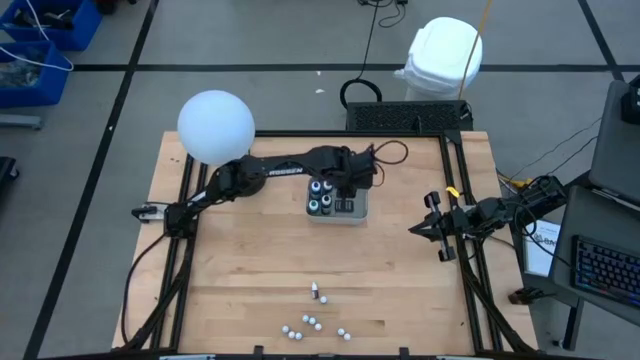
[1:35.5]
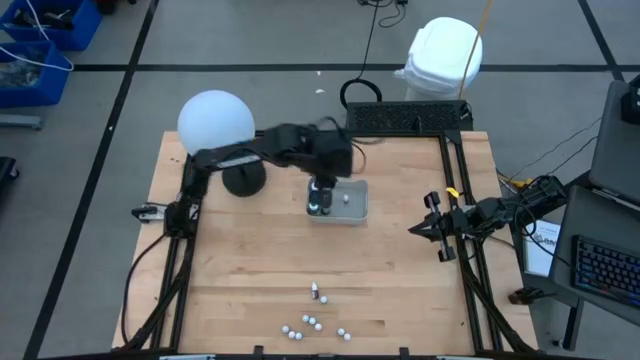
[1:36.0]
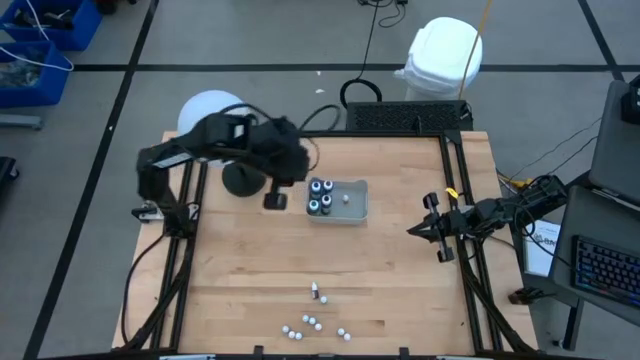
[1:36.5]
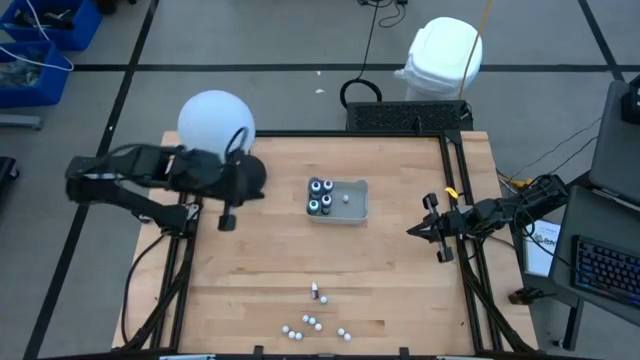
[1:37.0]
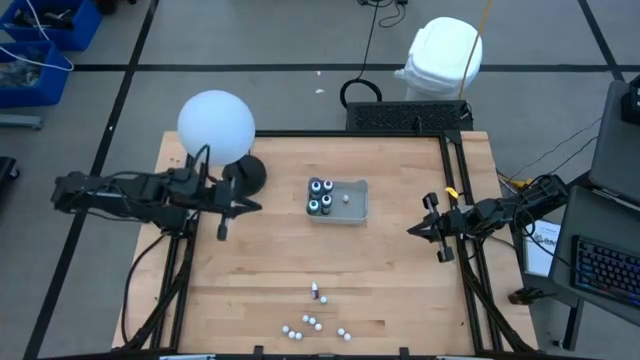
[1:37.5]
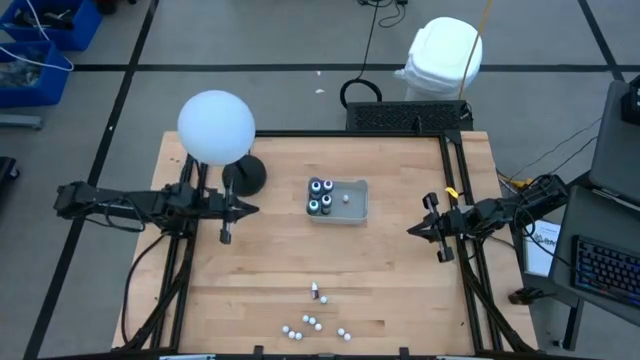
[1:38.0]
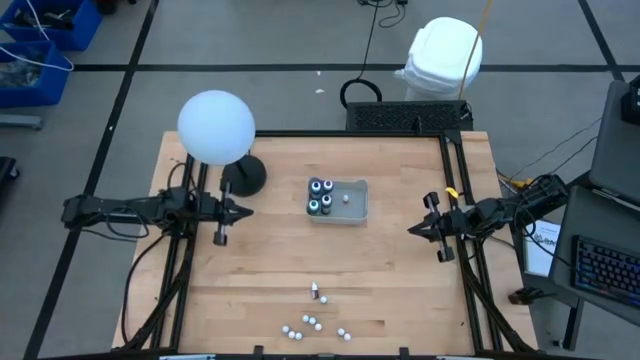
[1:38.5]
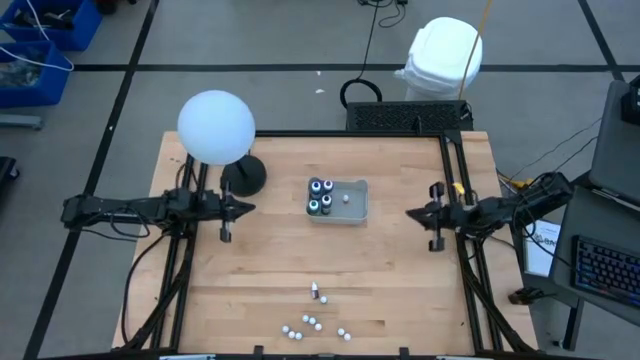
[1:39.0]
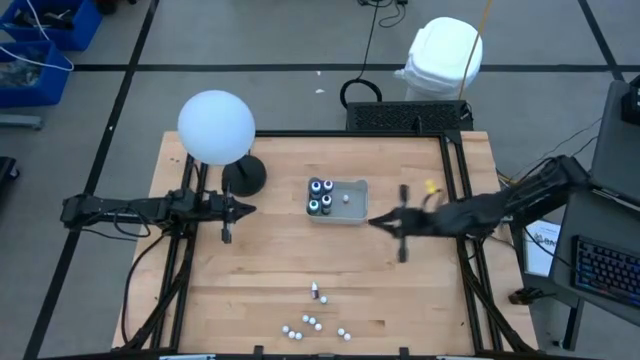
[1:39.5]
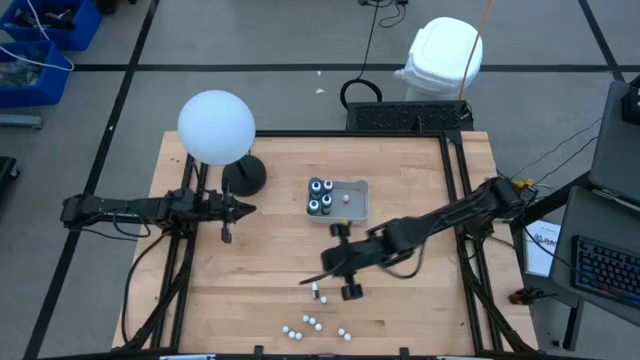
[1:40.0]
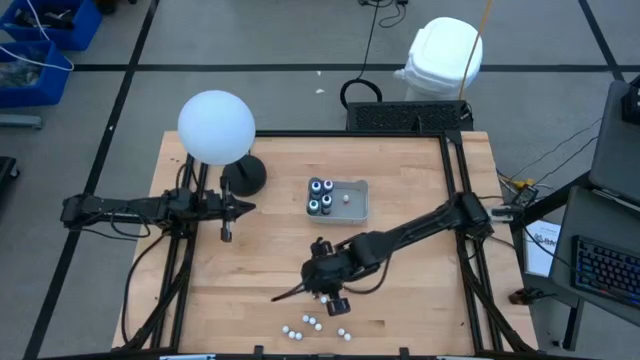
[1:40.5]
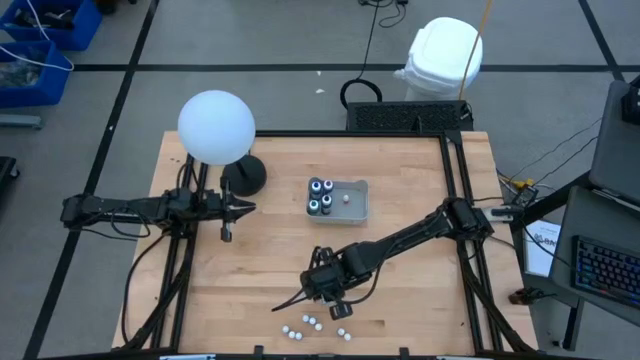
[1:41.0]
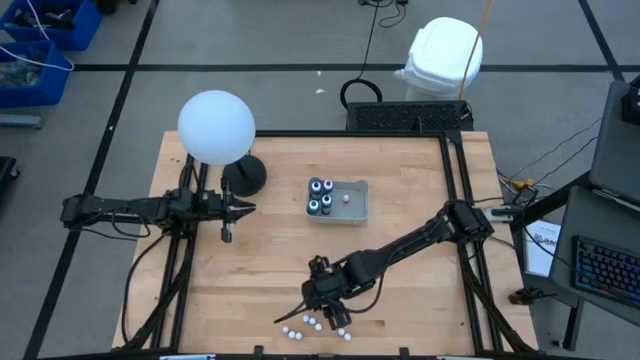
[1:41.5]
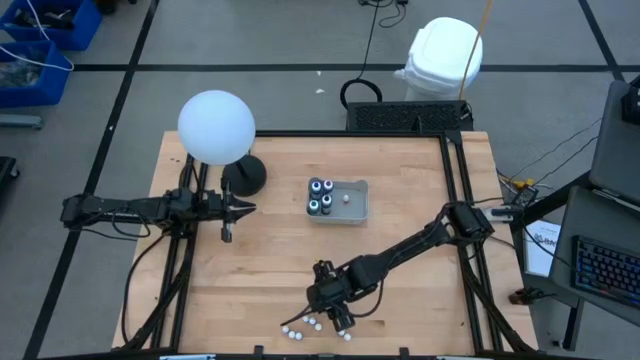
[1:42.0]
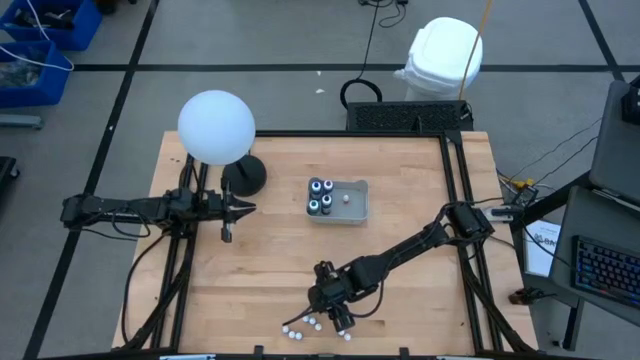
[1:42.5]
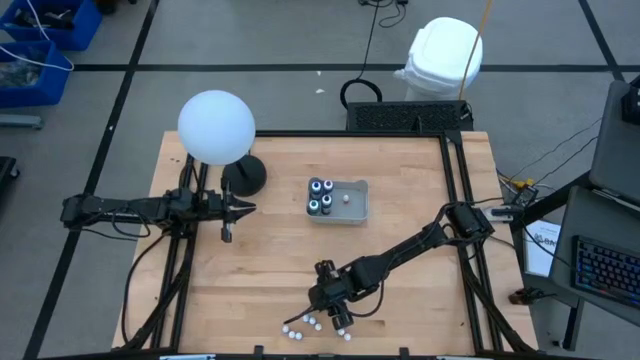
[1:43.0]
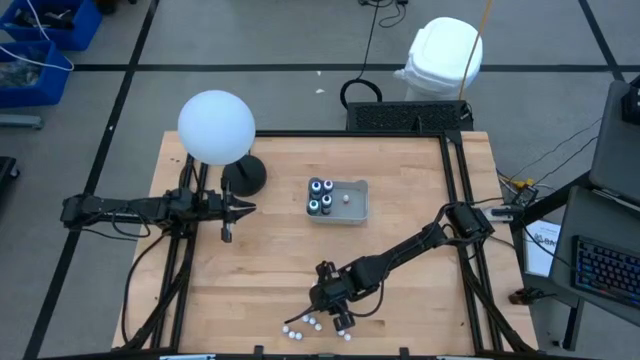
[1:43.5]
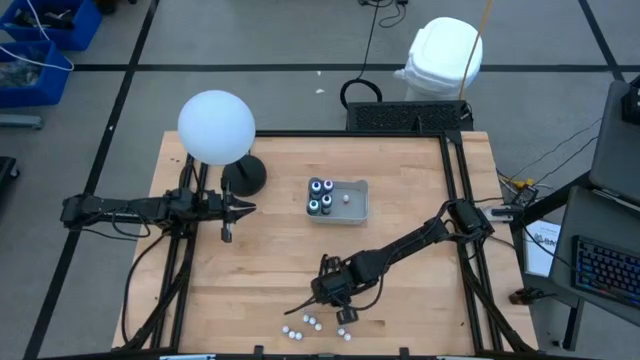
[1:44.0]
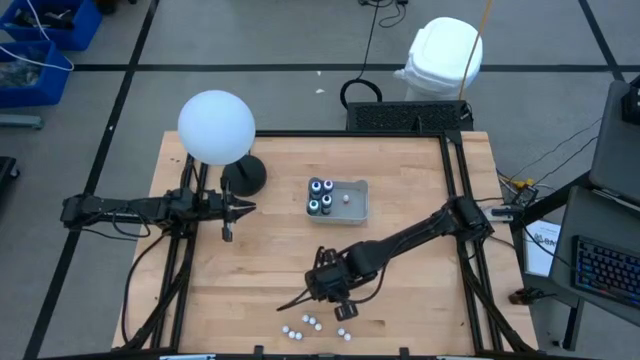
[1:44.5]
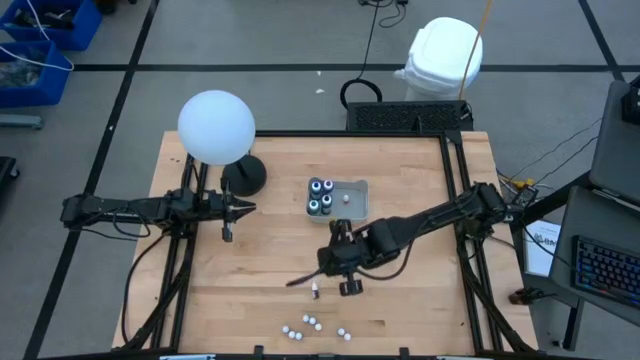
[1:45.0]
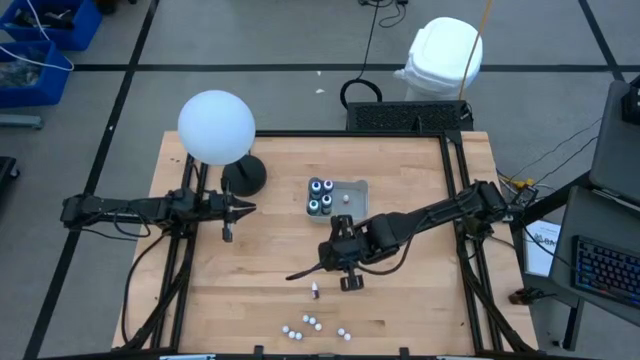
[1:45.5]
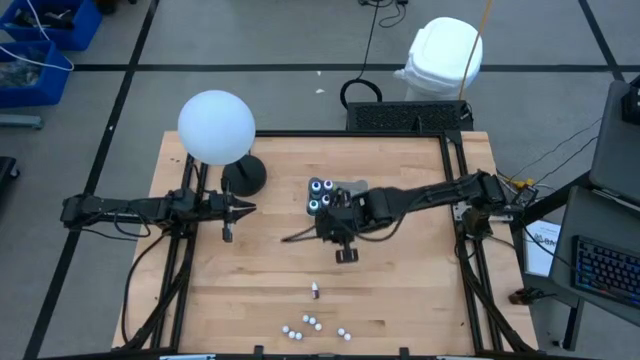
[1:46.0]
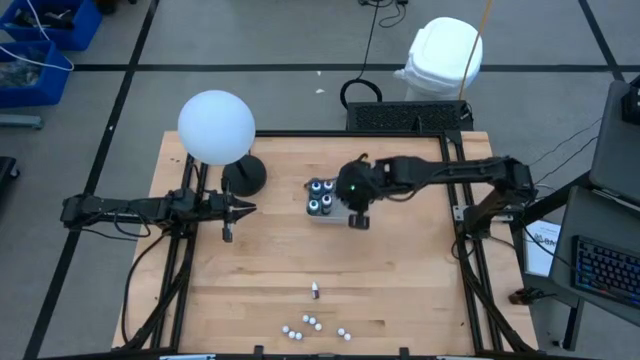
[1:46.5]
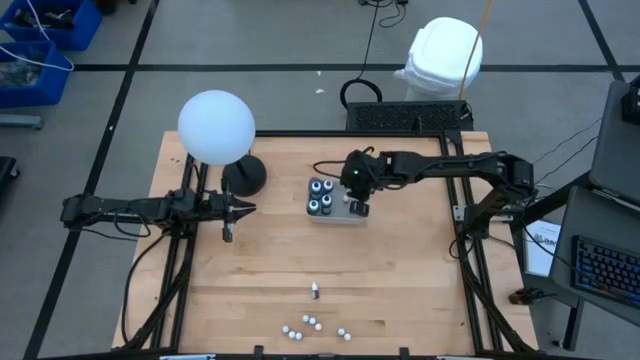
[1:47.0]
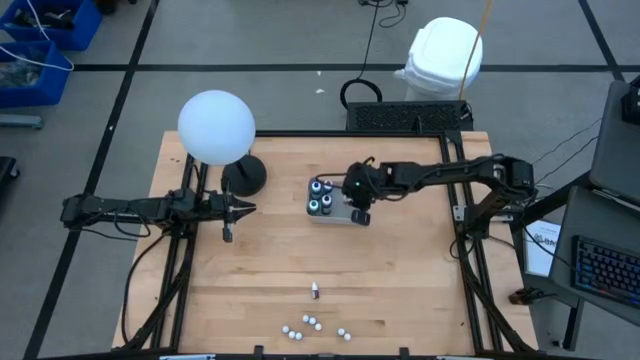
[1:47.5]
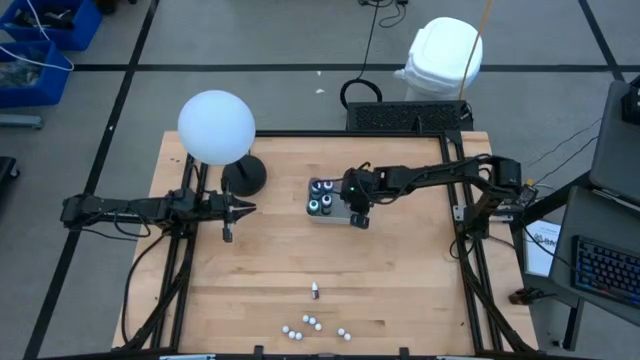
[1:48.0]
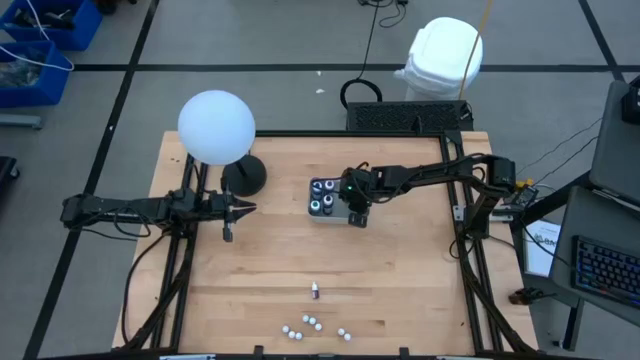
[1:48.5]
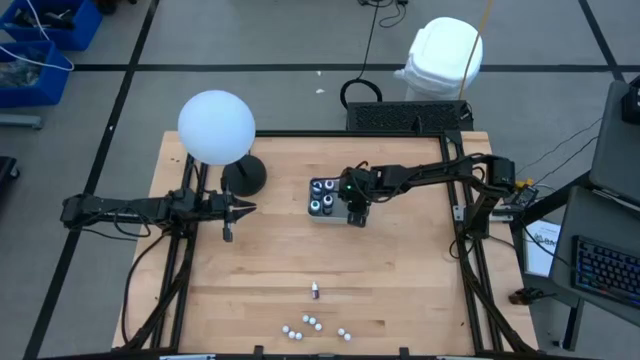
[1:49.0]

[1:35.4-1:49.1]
Task: Pick & Place food coloring
Put the top small blue food coloring bottle into the gray bin

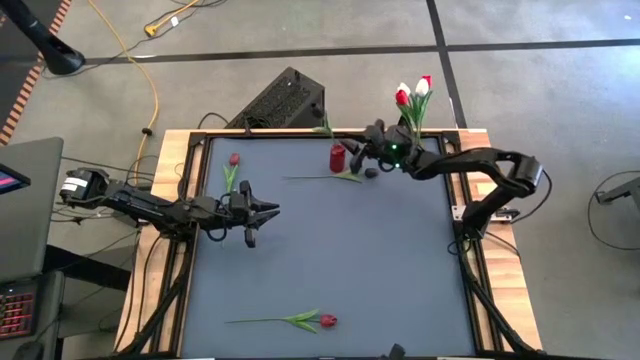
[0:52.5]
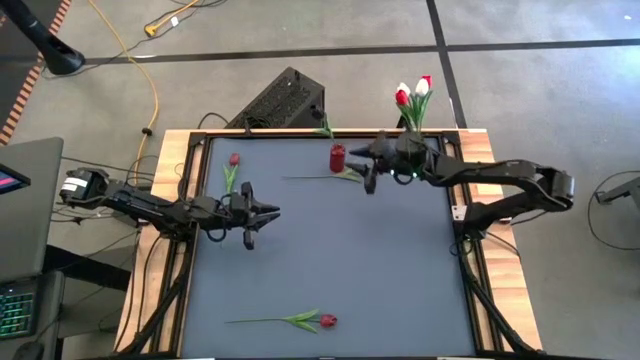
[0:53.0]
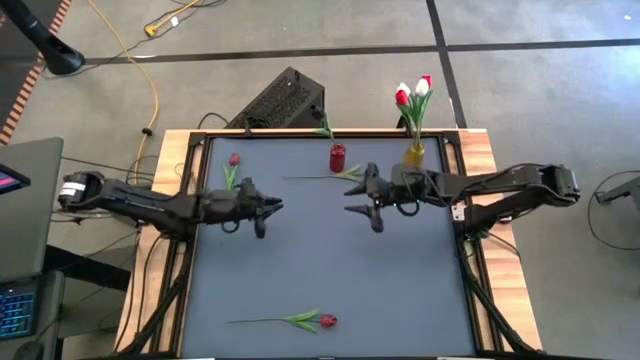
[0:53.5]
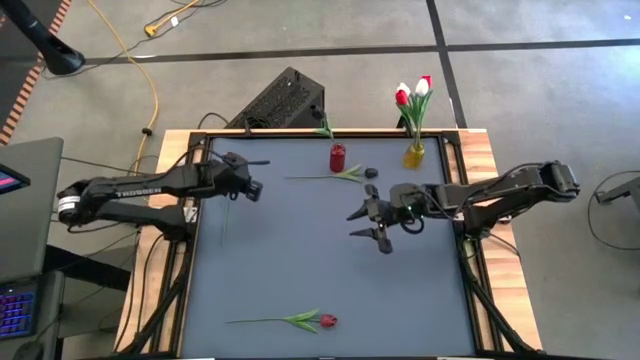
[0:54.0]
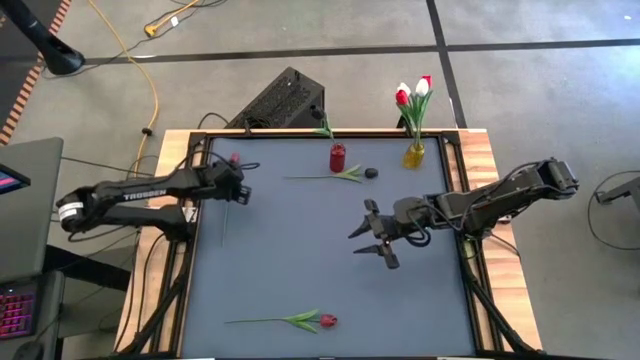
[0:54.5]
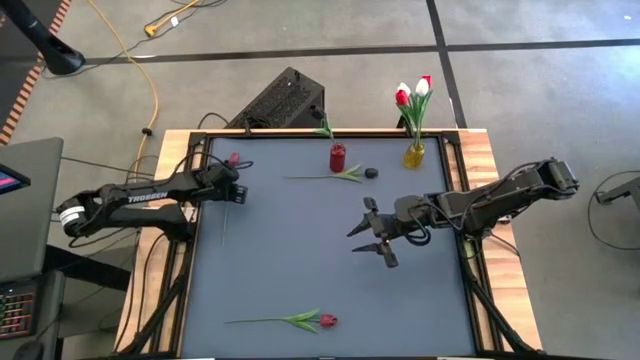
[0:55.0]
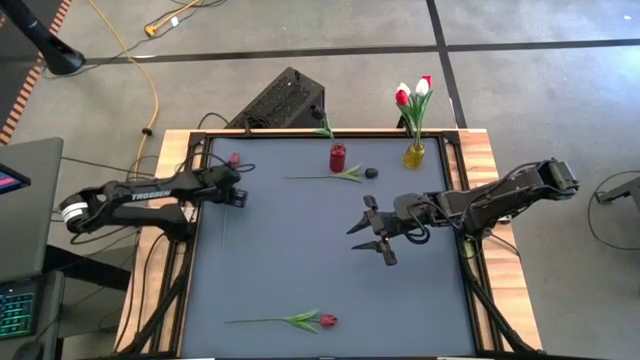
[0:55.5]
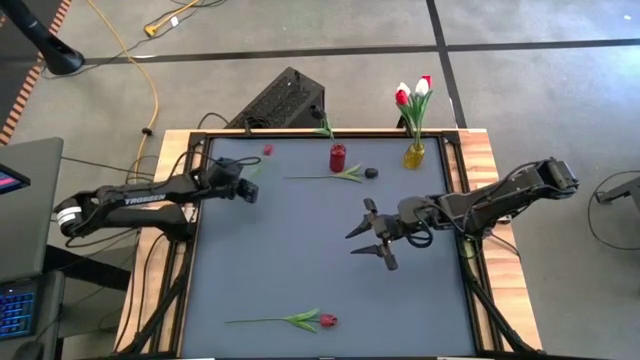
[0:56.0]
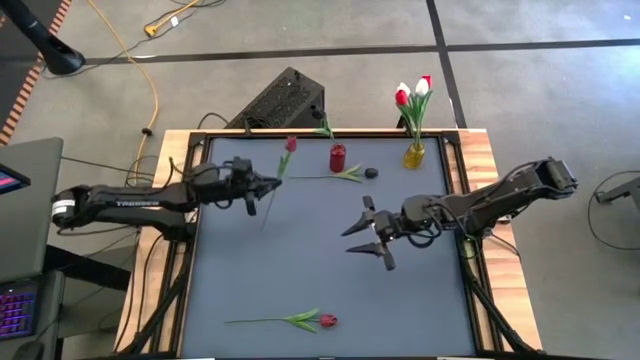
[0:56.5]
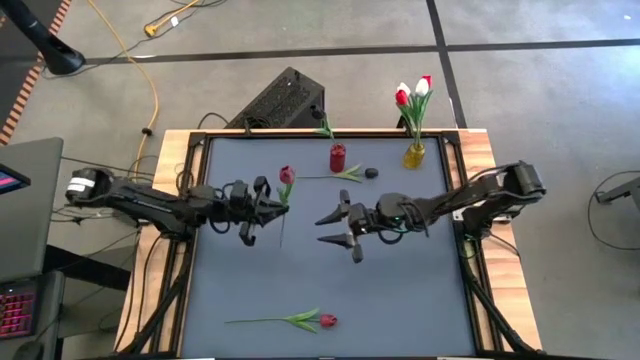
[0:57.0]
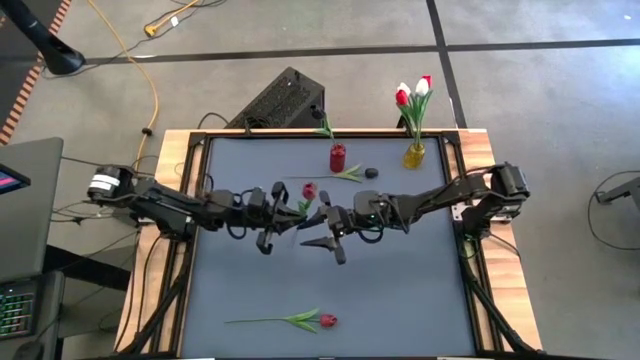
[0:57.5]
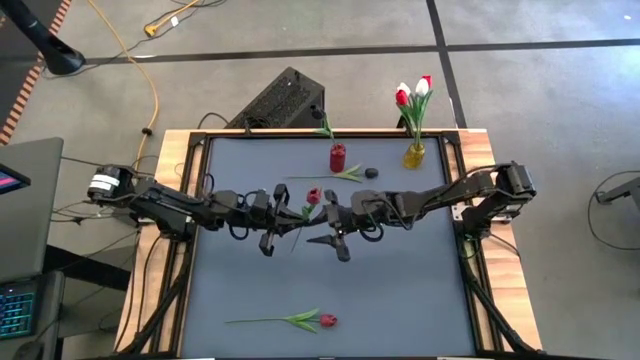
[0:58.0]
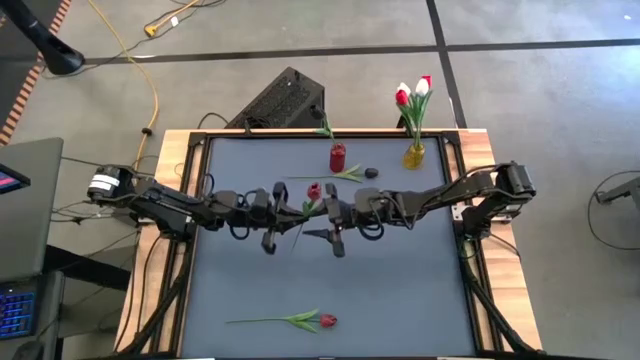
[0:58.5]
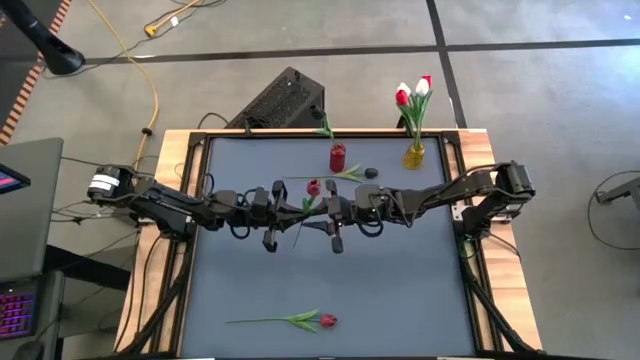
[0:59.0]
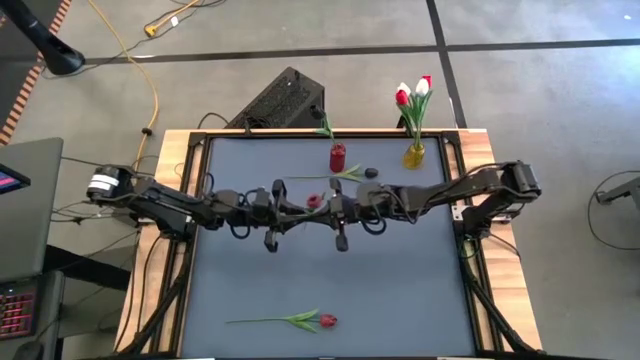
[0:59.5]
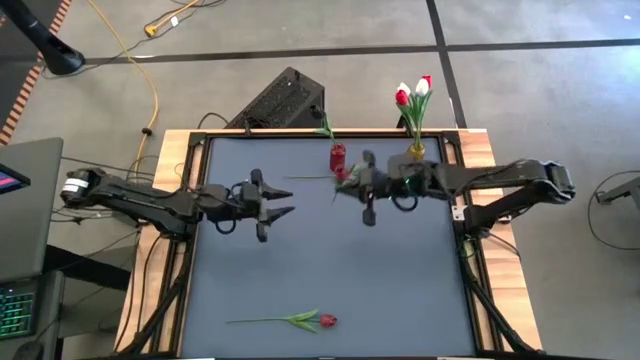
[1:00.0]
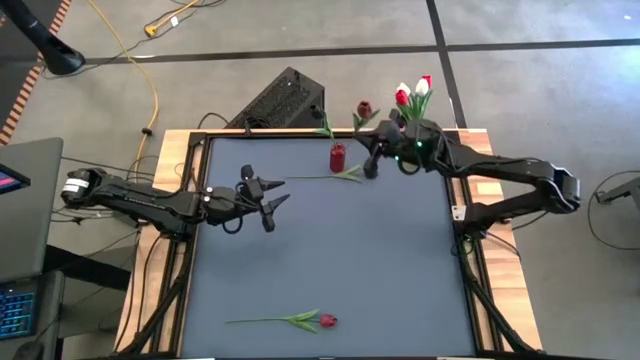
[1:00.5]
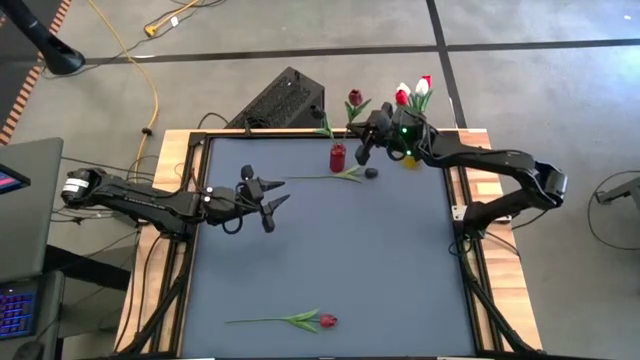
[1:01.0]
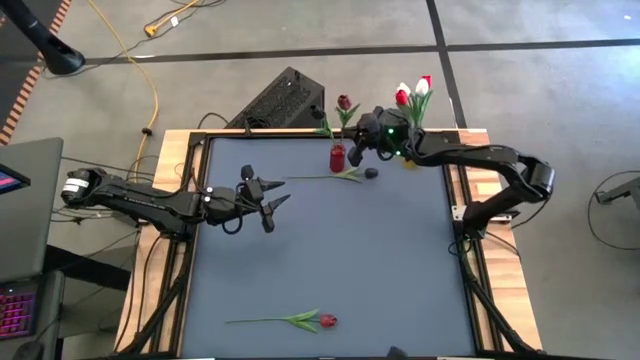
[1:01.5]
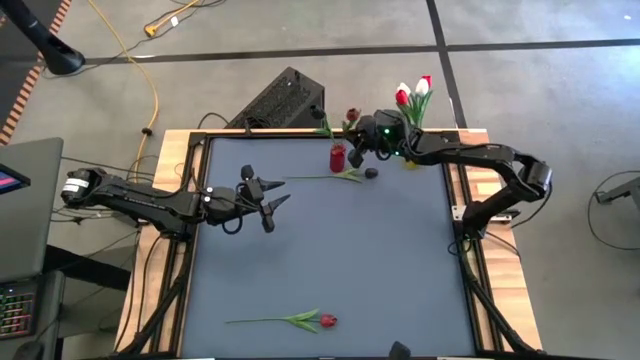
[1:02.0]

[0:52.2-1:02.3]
Task: Sort flowers into vase by color
Put the top dark red tulip into the red vase
